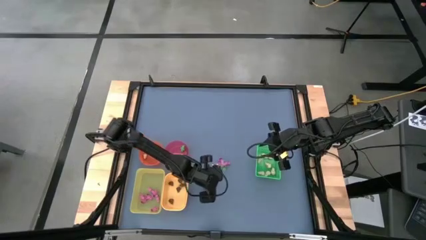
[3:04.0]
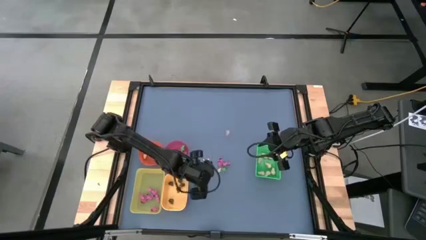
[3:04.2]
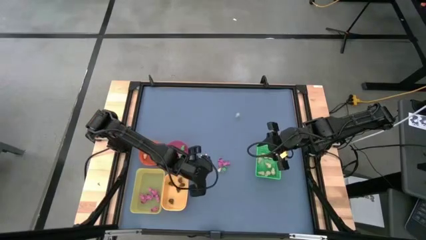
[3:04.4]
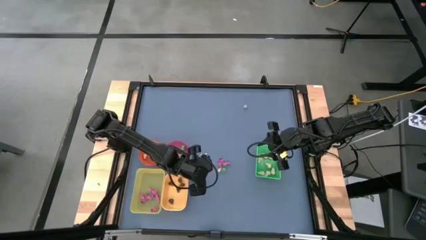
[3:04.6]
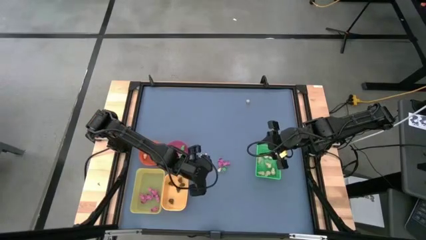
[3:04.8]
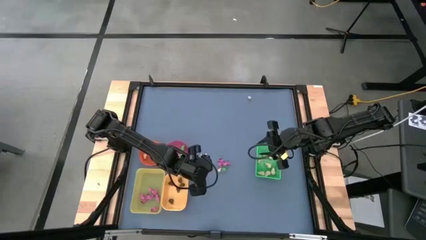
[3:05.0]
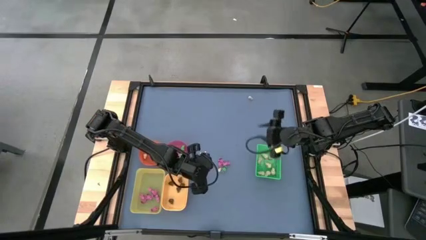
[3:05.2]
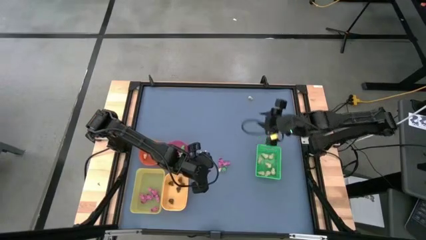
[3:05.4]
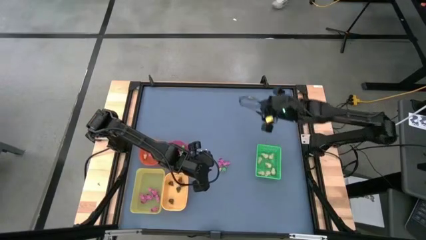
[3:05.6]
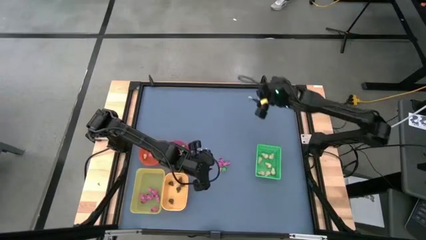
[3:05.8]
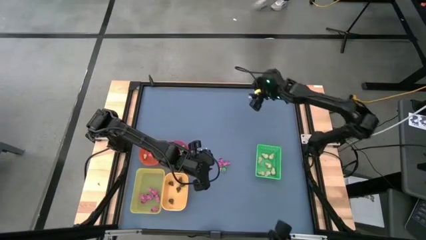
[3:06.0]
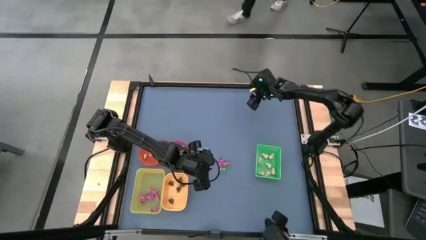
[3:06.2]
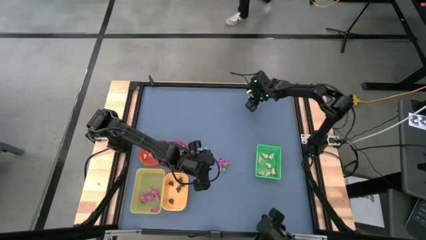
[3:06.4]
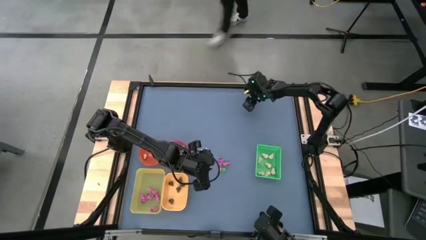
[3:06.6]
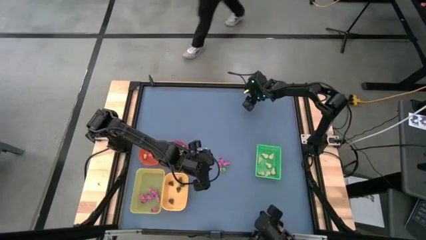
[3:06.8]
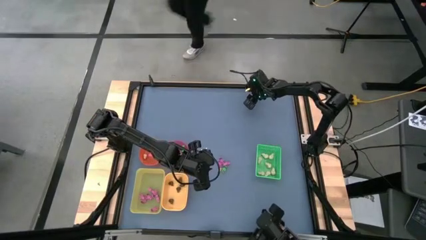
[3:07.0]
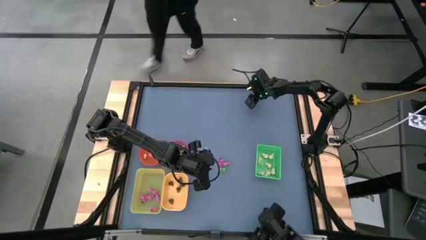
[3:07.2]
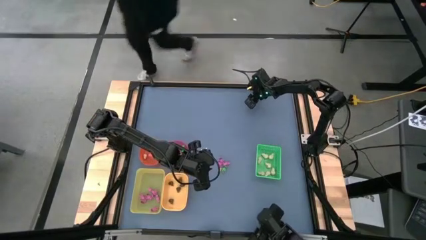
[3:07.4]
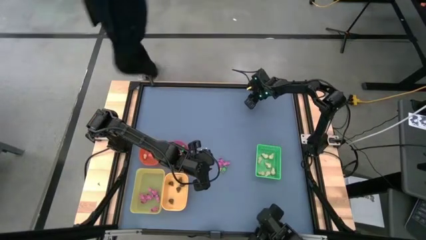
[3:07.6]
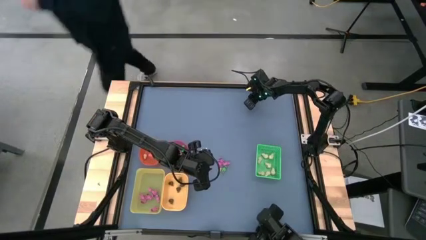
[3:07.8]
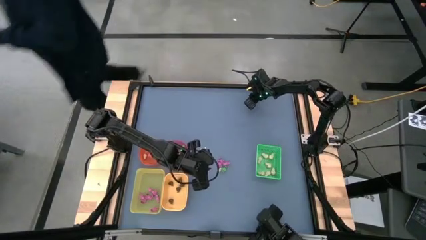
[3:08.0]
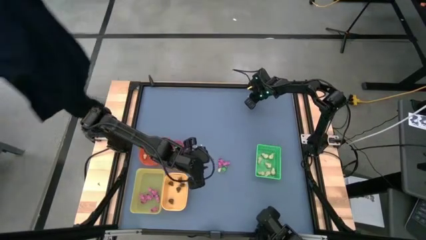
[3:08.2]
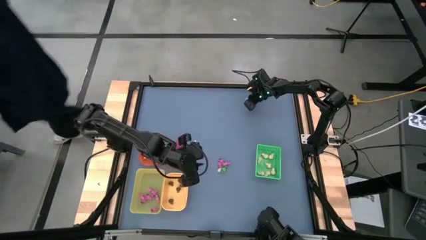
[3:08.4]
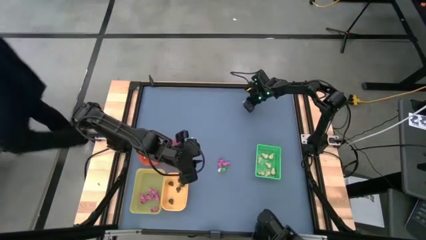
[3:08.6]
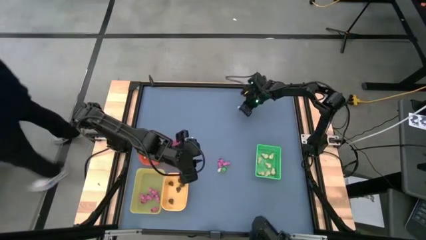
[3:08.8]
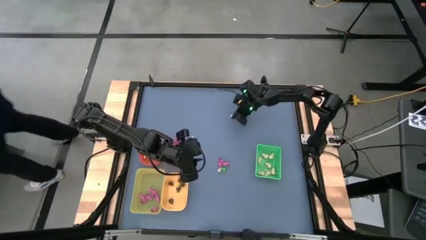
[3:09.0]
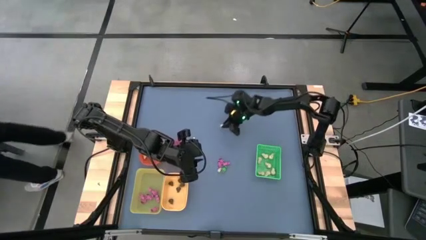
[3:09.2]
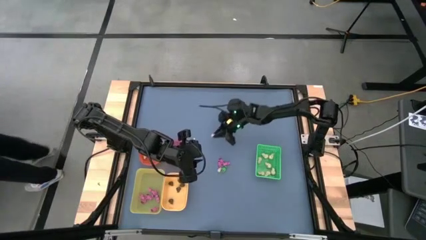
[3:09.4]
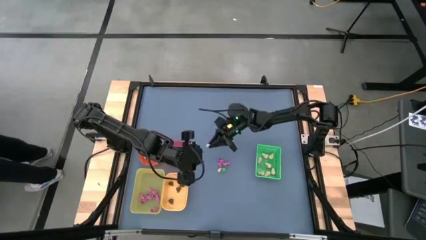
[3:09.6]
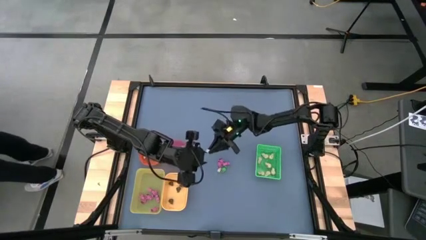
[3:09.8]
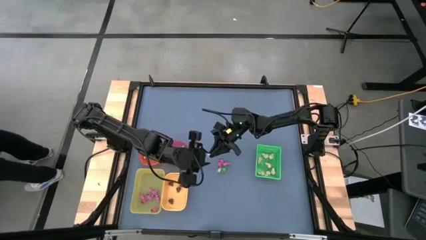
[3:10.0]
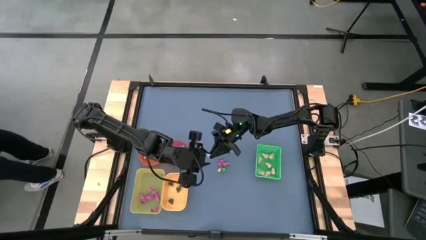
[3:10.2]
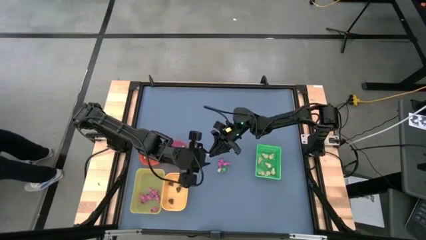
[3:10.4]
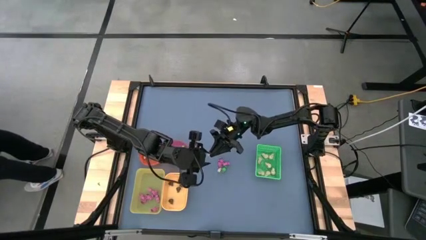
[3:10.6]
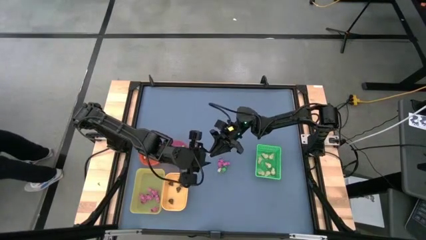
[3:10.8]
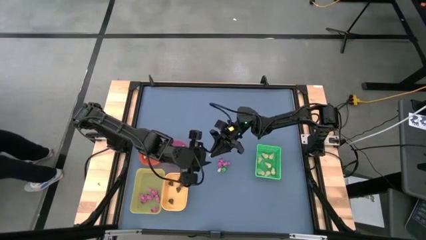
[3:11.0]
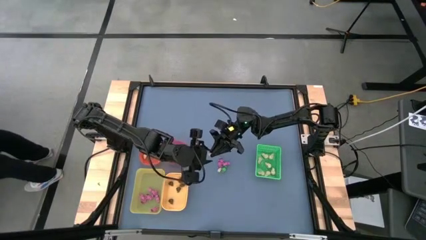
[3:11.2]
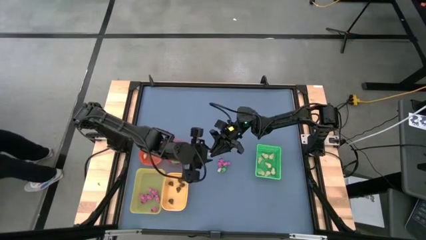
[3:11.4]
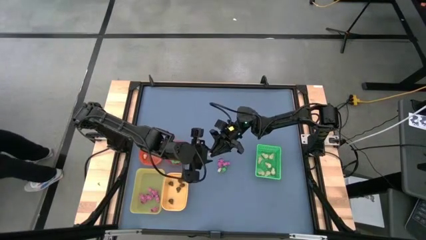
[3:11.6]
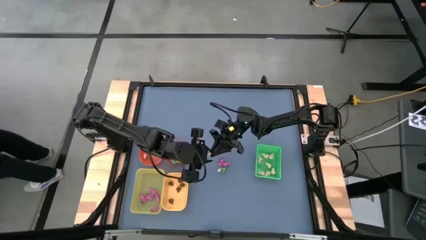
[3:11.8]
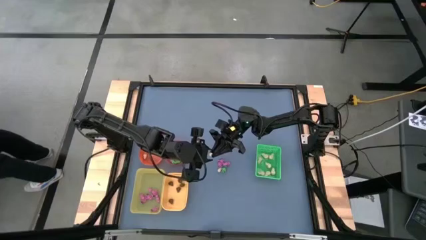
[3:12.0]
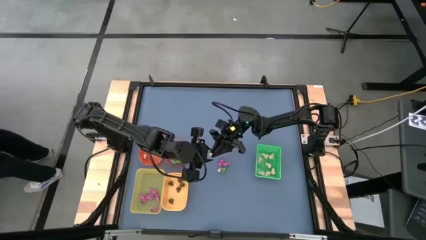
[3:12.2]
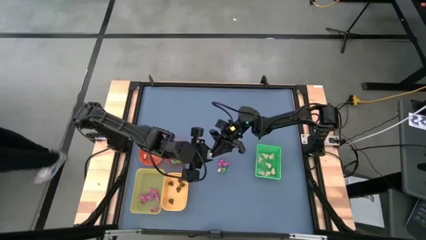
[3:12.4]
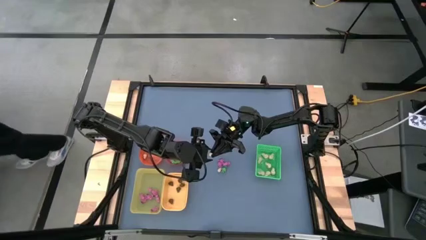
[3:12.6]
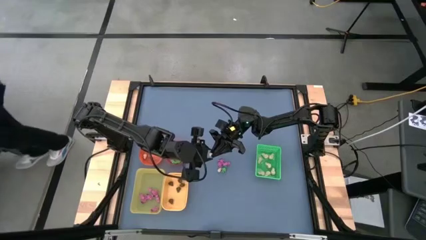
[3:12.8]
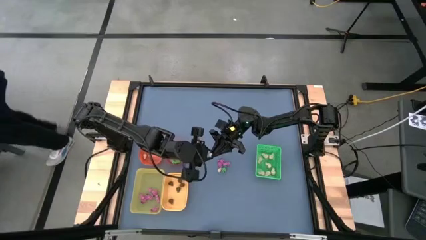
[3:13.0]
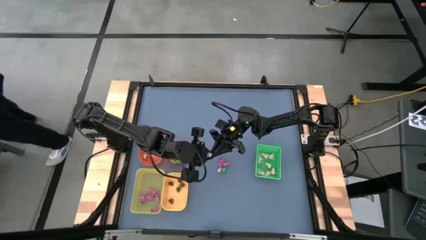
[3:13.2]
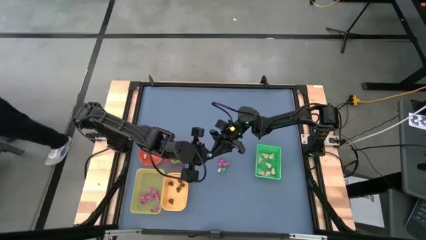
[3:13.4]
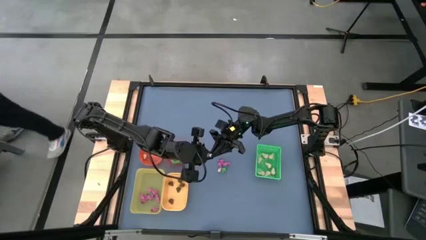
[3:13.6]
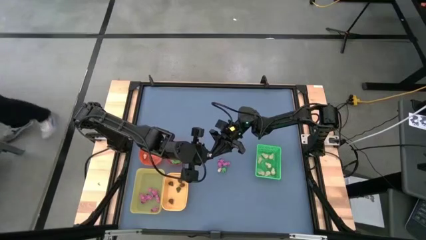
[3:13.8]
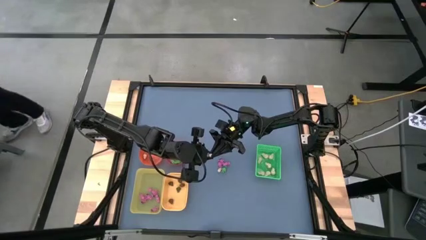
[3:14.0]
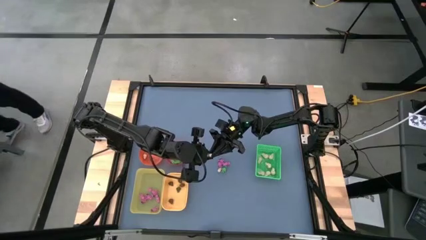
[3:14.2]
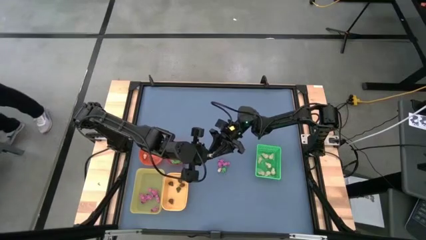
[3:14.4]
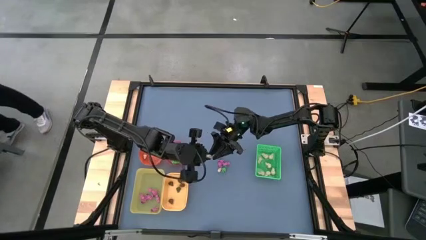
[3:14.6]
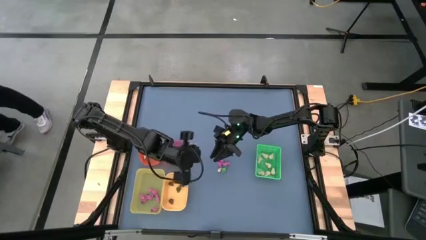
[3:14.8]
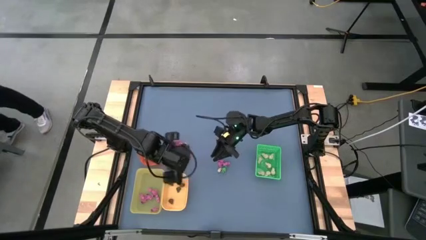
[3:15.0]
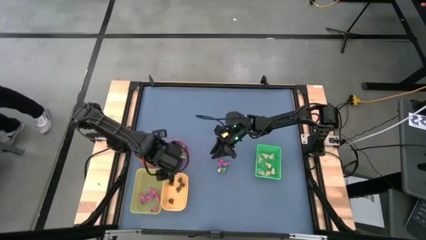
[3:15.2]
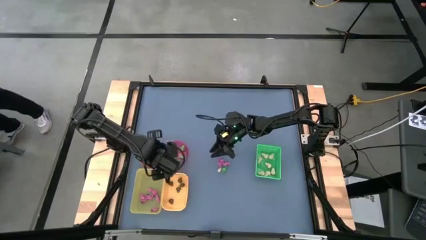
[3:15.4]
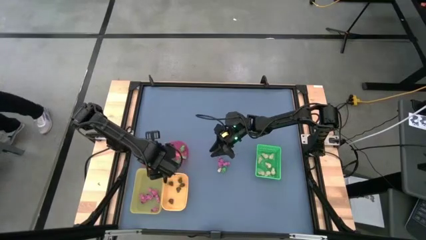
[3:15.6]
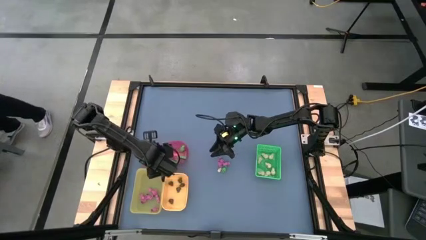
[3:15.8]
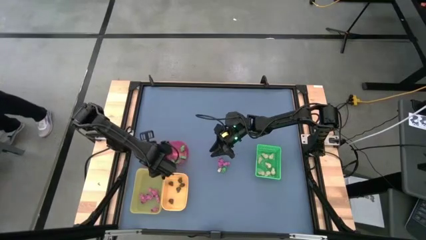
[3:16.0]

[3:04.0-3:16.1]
Task: Sort Halloween decoration
Put the white skull toy into the orange bowl

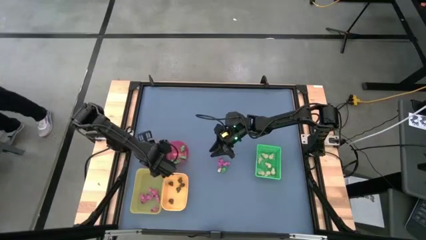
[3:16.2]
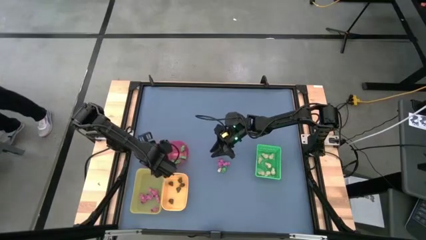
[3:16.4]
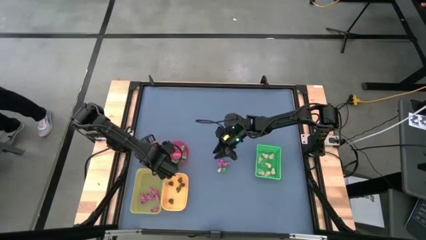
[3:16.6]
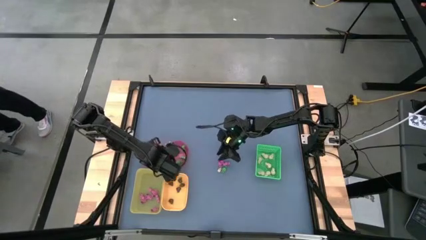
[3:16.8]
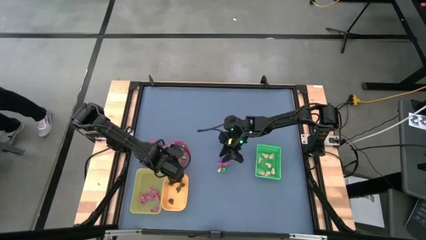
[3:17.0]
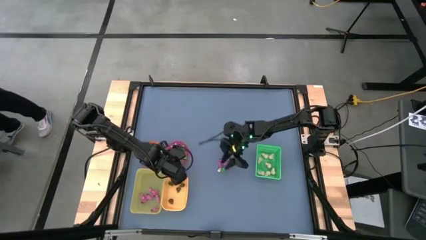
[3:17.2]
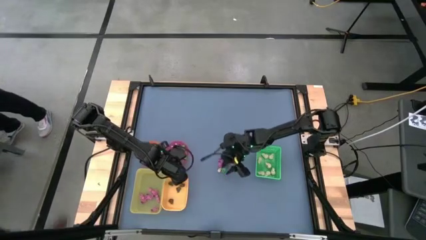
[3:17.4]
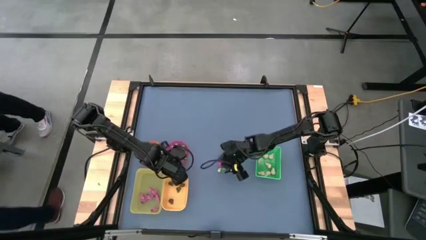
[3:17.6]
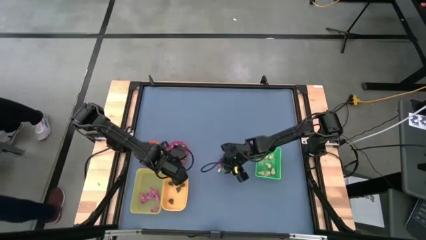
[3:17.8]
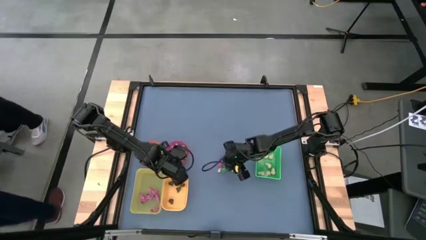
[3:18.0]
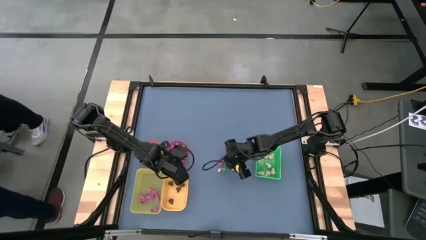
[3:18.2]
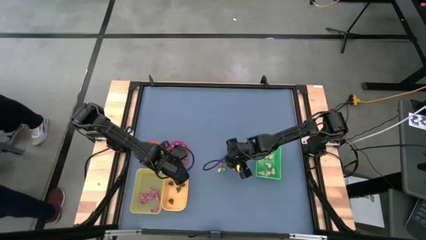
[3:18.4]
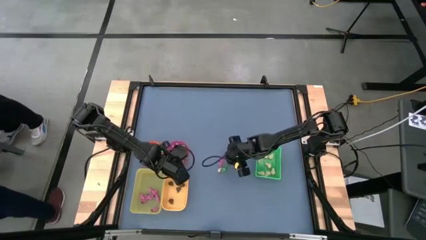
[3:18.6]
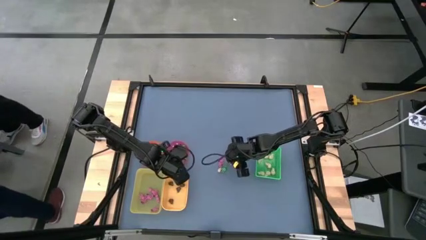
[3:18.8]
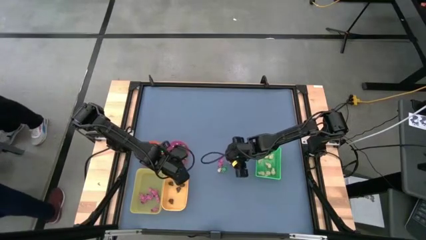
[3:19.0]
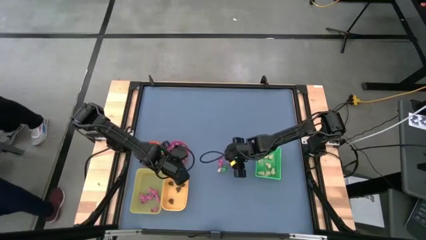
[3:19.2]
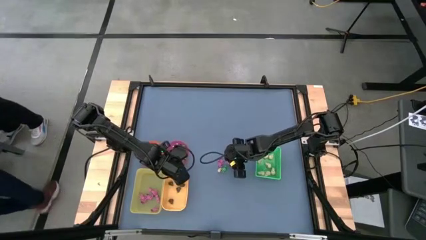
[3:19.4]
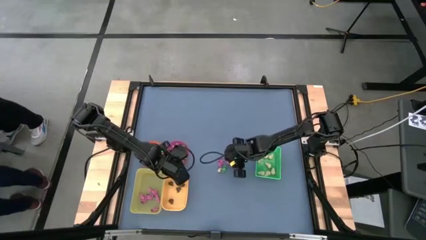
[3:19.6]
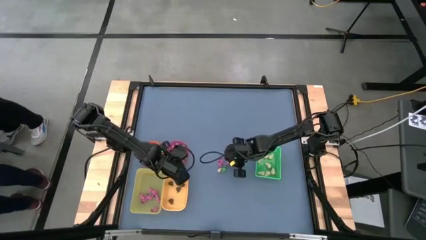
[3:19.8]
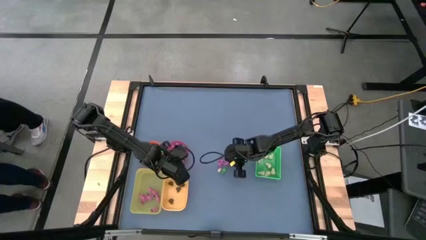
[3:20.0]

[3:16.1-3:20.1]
Put the pink skeleton toy into the light yellow bin
